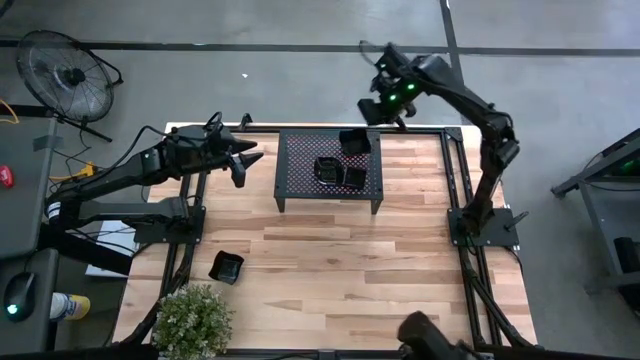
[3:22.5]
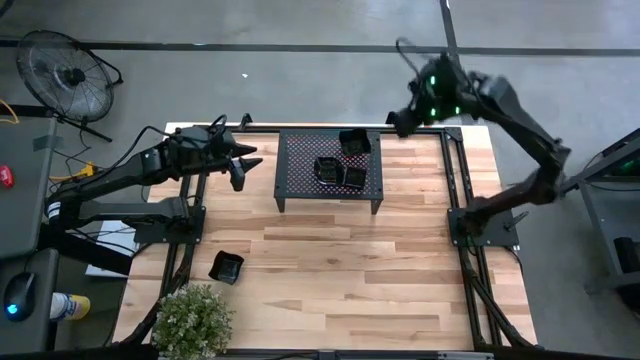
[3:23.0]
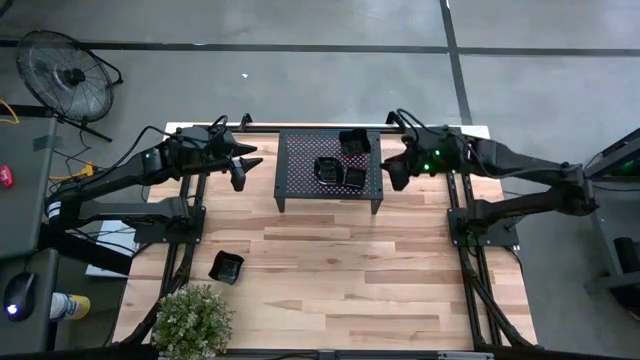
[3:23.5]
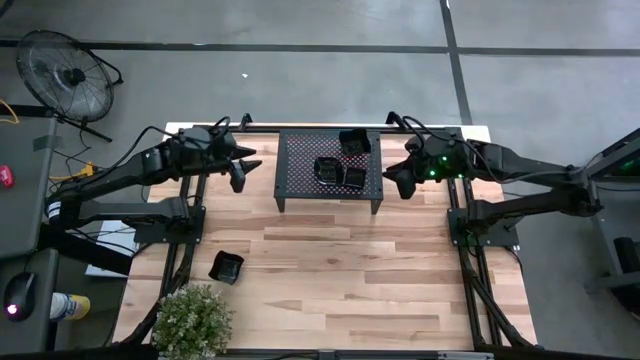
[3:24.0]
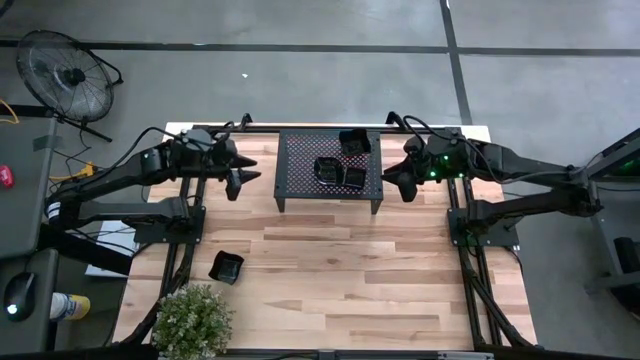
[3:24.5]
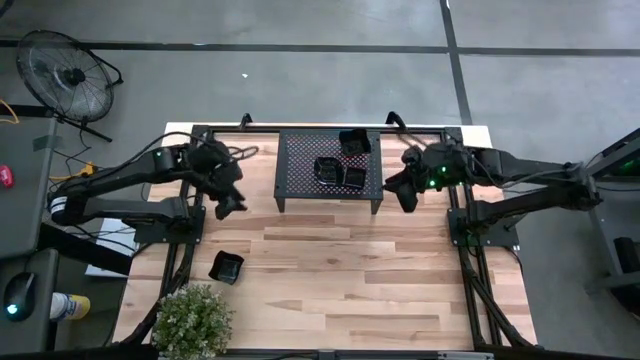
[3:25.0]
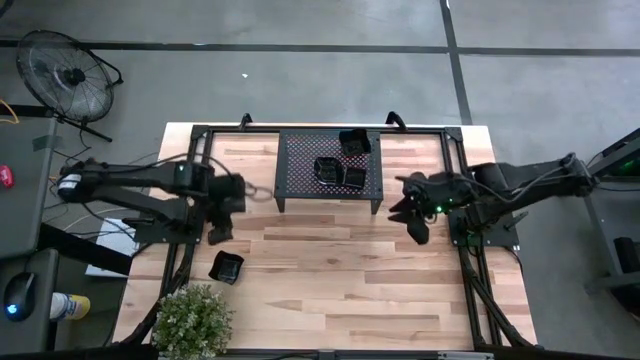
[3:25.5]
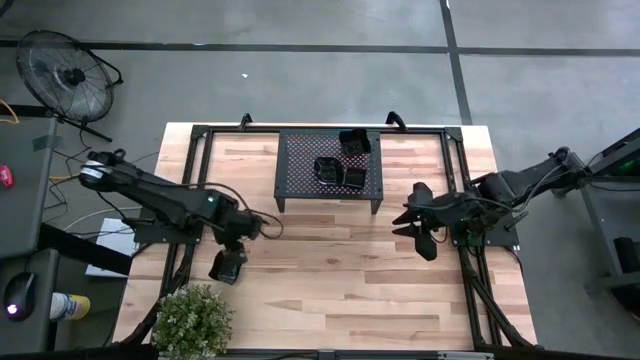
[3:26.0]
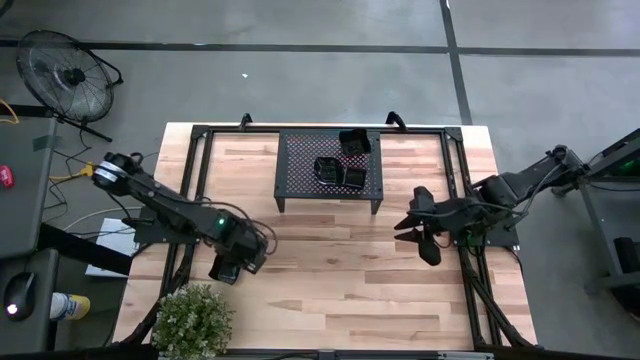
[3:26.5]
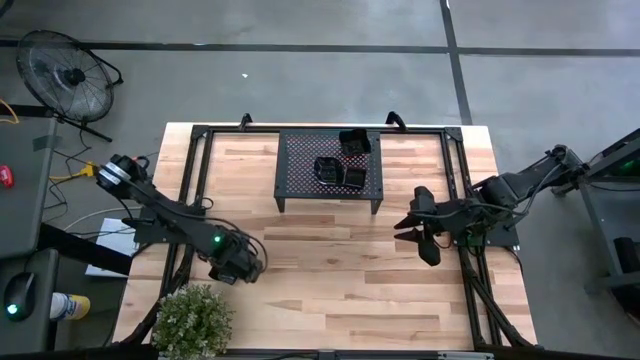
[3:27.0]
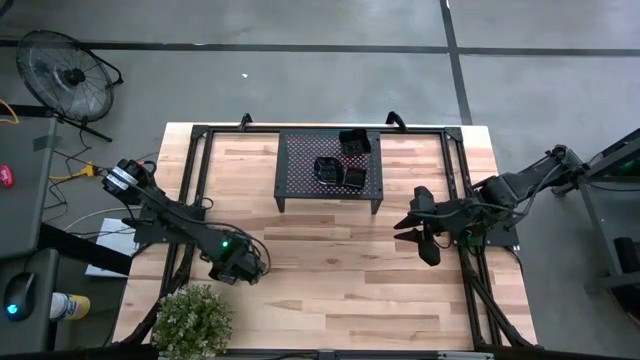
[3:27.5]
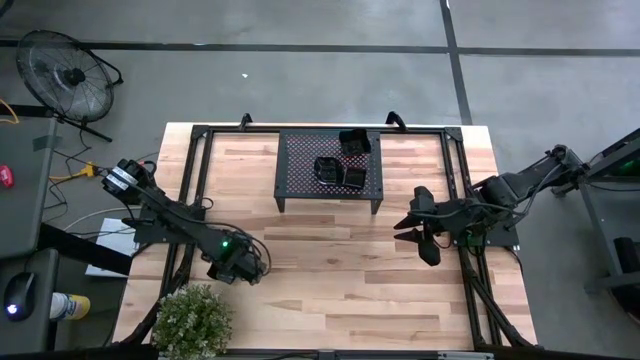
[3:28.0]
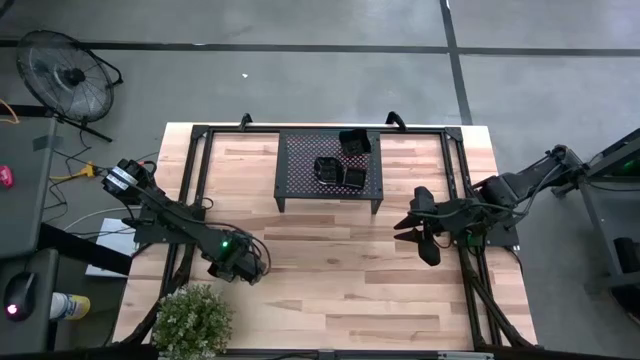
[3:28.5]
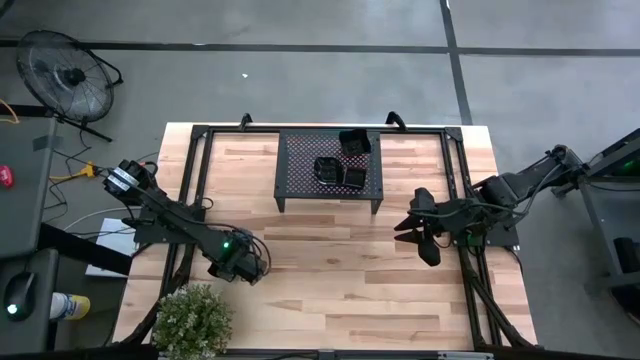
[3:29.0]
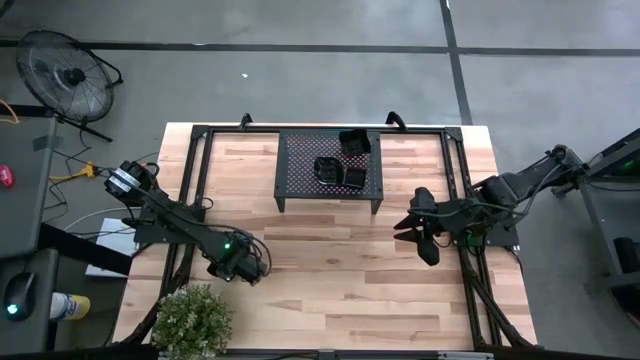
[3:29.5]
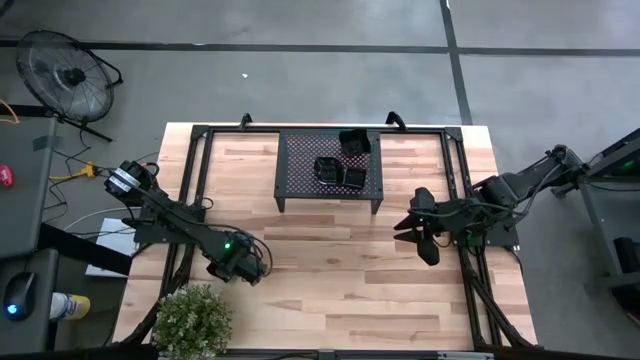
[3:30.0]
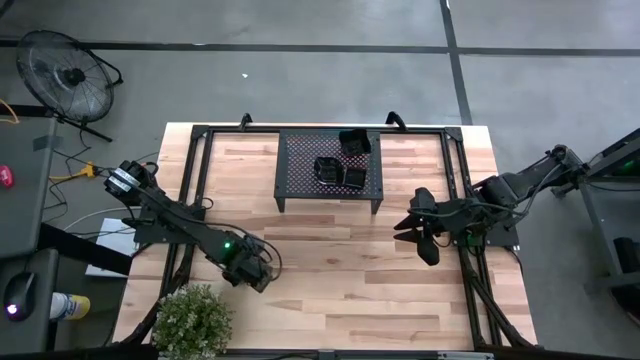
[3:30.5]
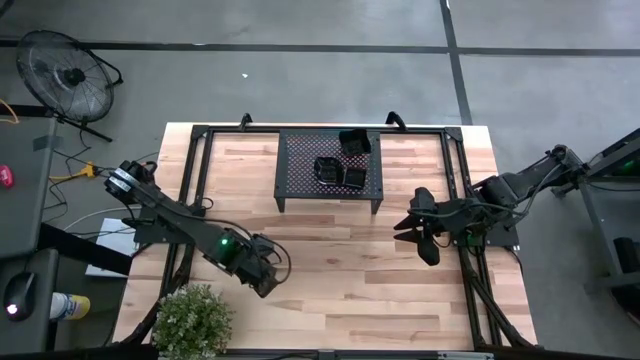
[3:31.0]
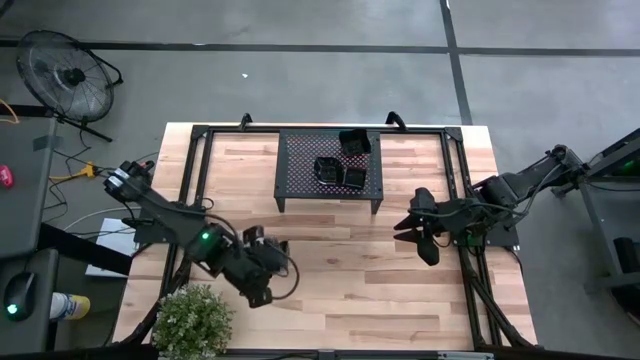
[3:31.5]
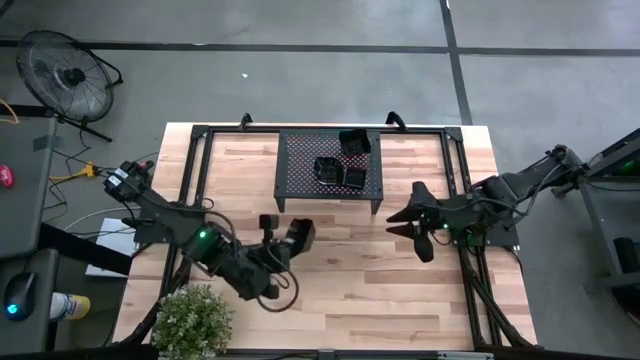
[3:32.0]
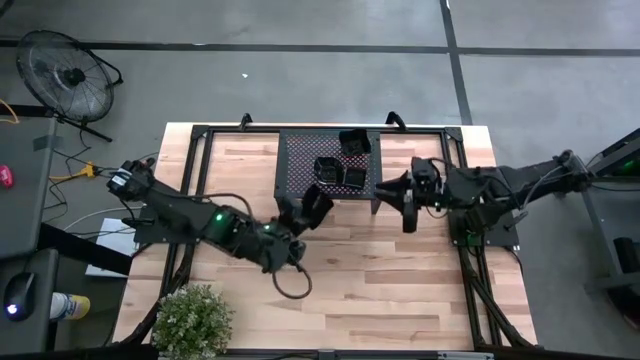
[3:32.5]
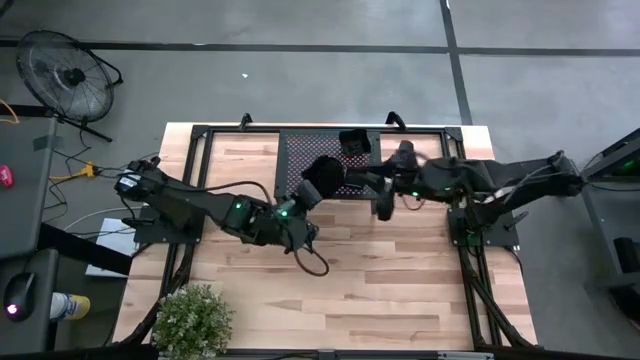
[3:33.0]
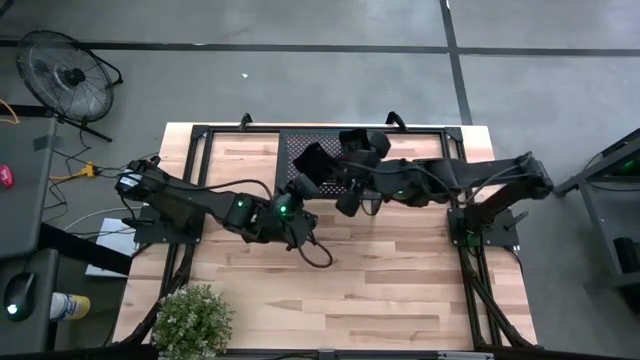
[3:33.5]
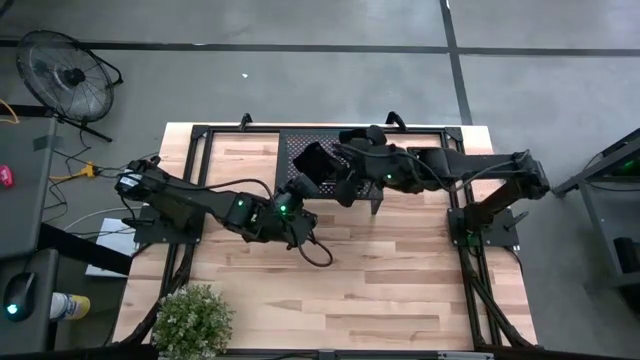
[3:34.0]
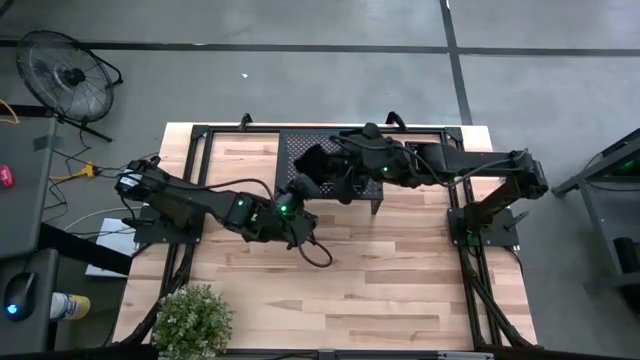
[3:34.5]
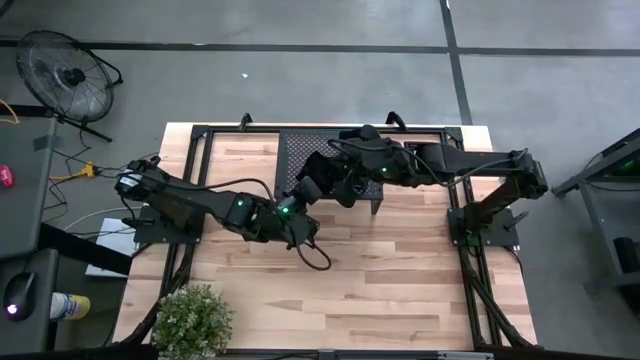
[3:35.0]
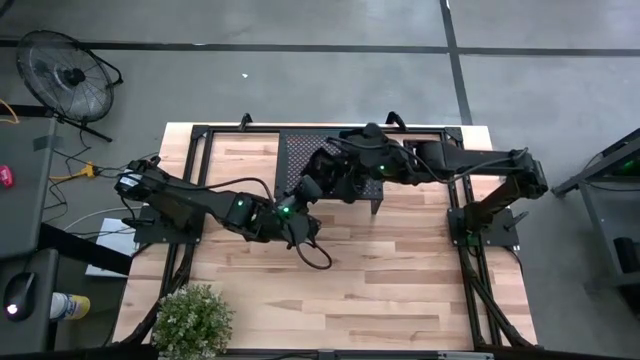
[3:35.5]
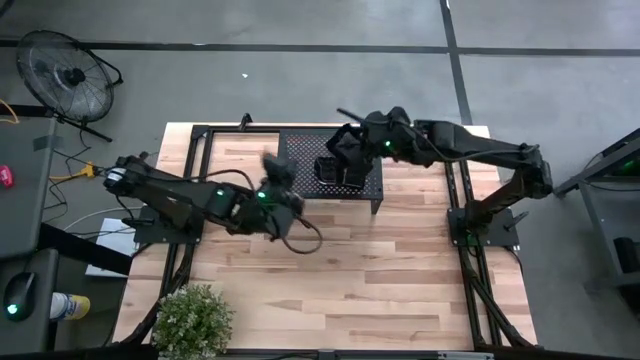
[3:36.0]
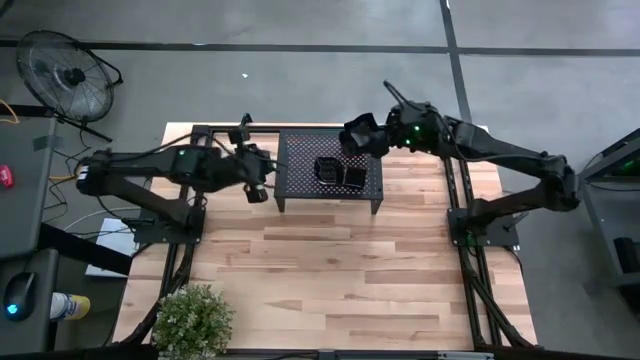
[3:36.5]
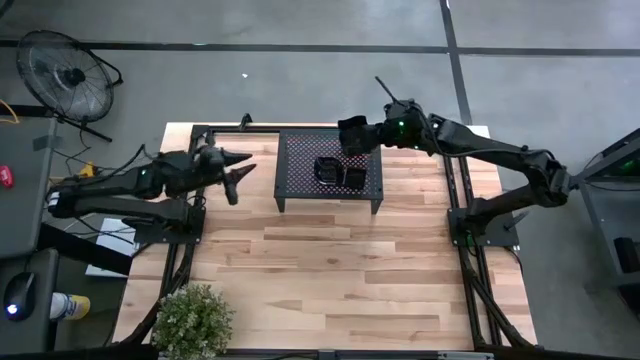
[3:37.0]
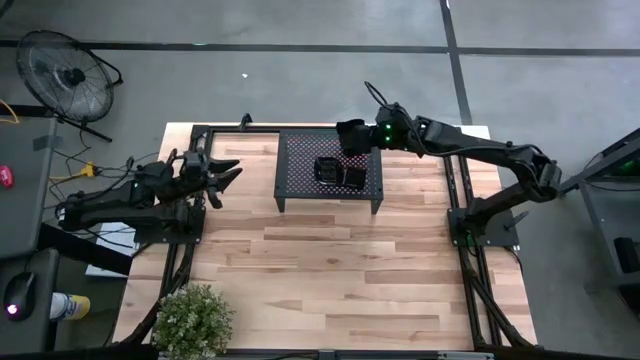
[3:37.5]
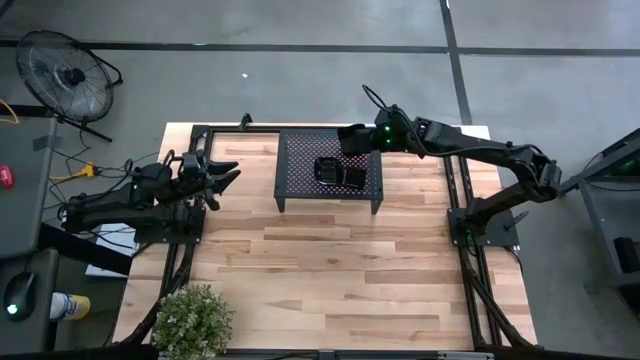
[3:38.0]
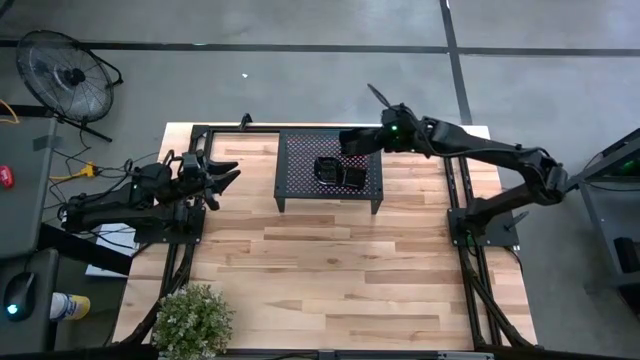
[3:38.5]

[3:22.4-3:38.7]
Task: Pick & Place Mini shaped plates
Stack the black distorted square plate on top of the other black distorted square plates on the shelf

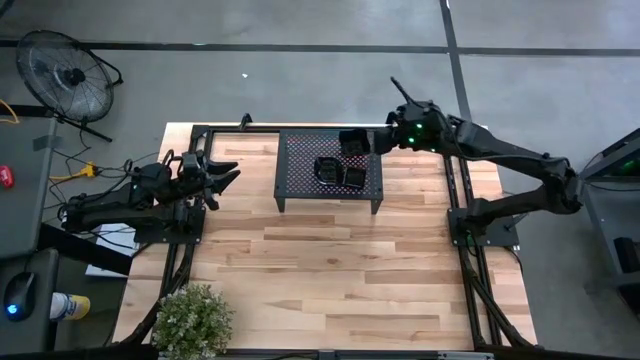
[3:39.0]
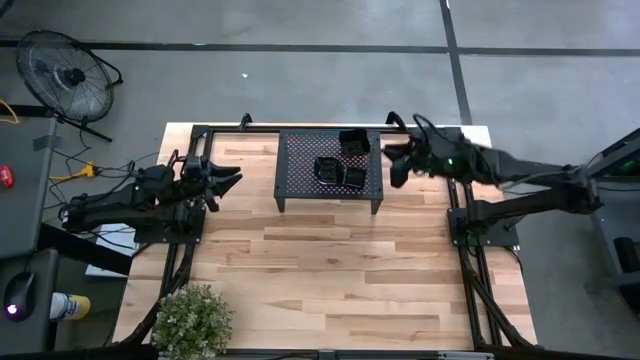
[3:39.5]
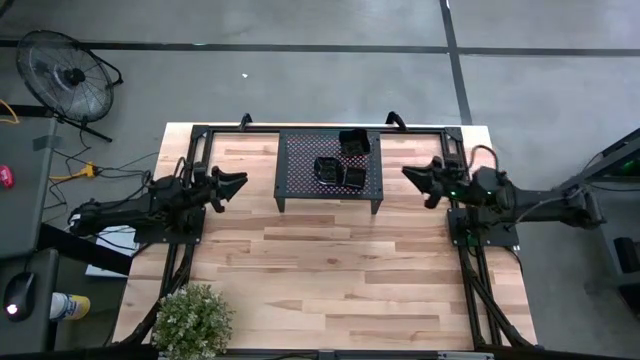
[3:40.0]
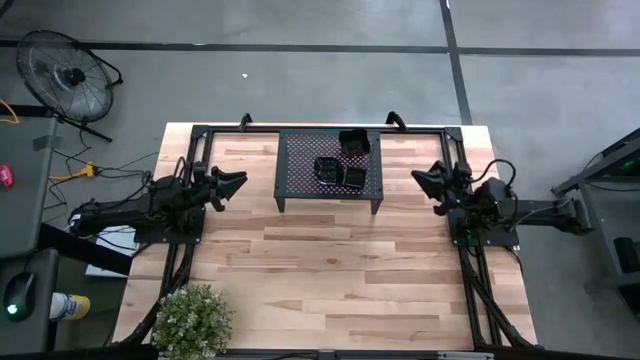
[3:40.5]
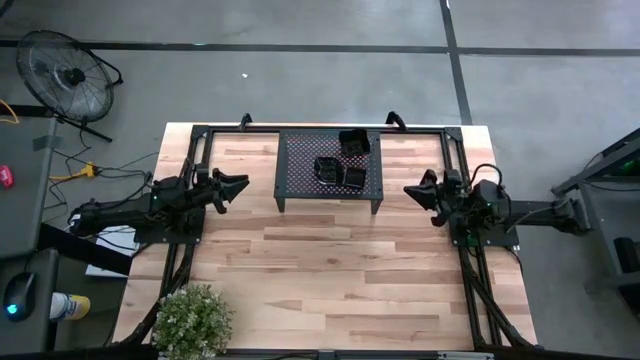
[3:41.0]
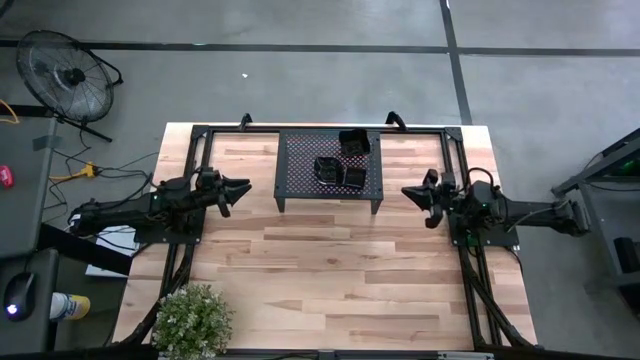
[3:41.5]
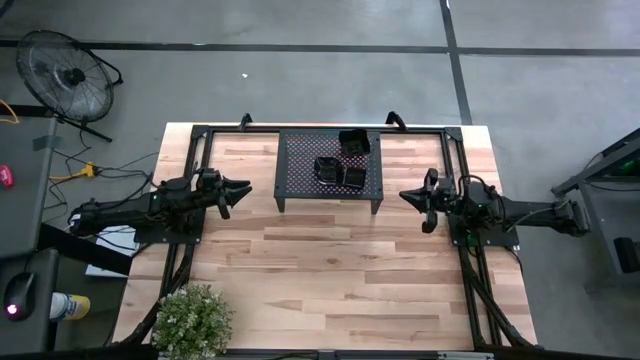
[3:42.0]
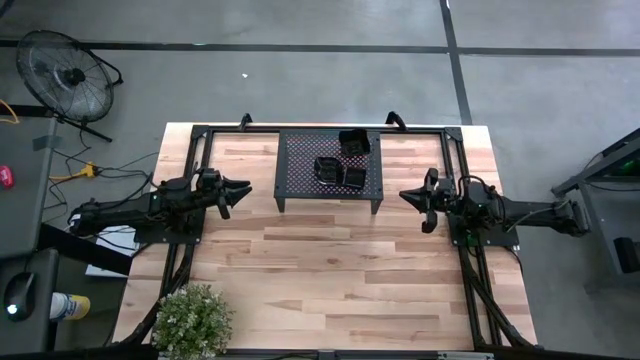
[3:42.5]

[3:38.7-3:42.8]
Return to Home Position

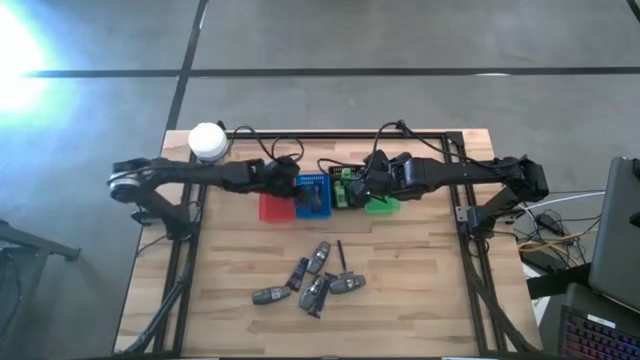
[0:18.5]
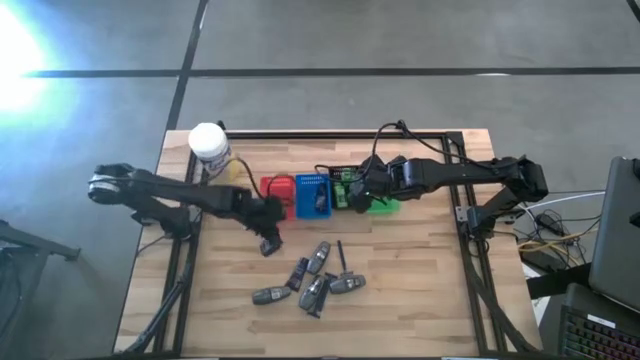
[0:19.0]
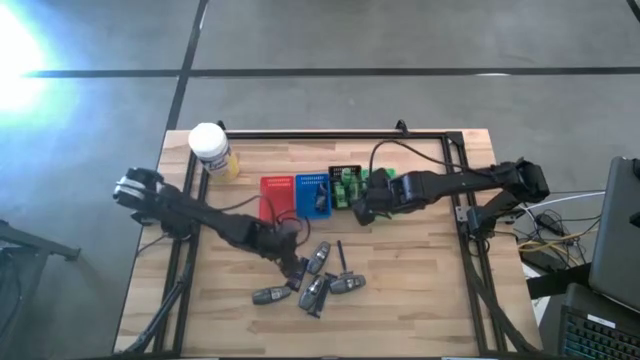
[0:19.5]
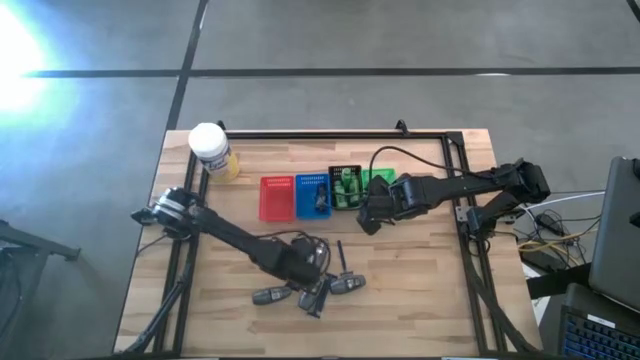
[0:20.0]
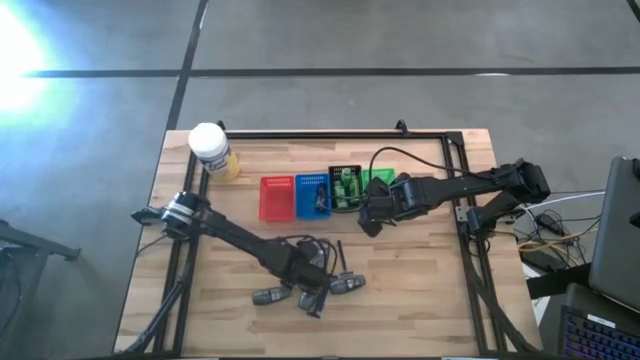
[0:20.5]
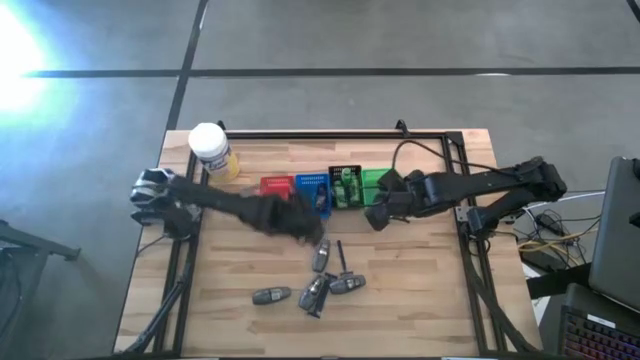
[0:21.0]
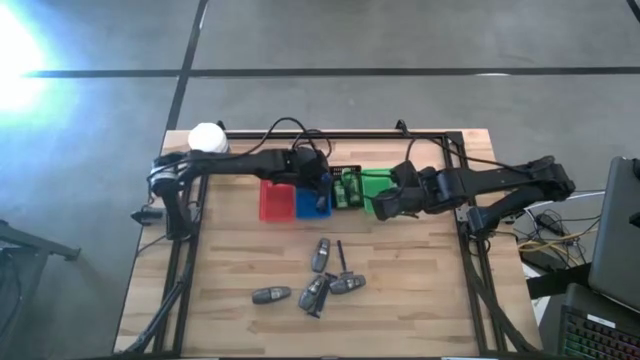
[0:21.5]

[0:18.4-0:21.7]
Task: Pick & Place Travel size toiletries
Put the blue shave cream into the blue bin
